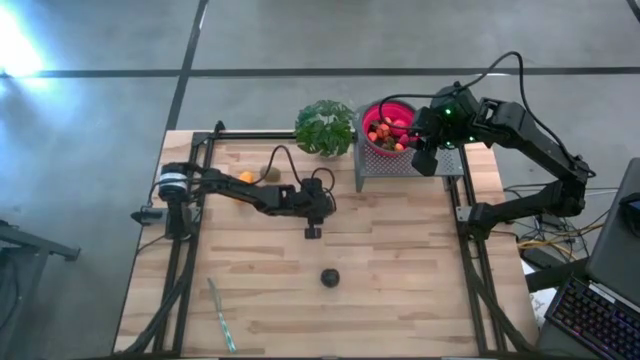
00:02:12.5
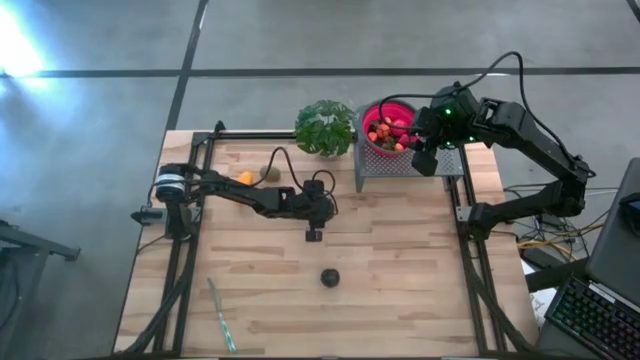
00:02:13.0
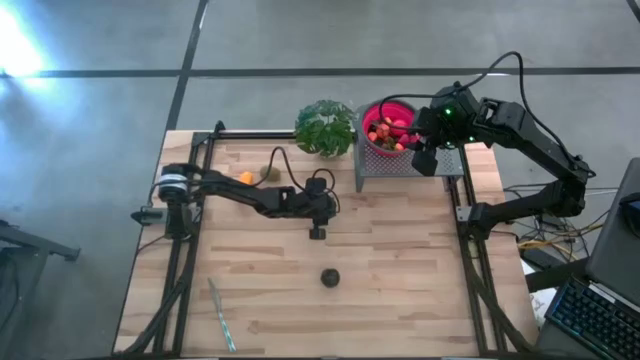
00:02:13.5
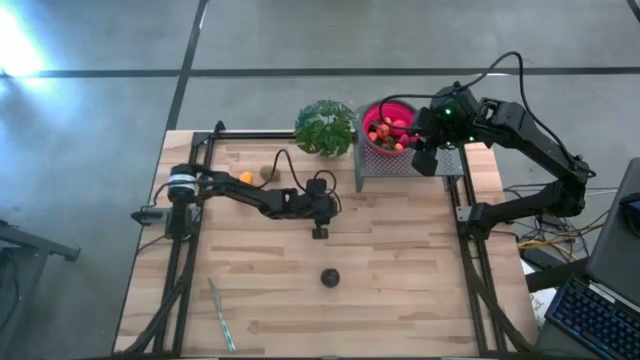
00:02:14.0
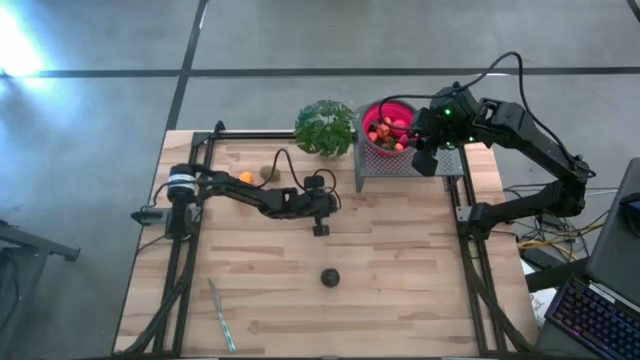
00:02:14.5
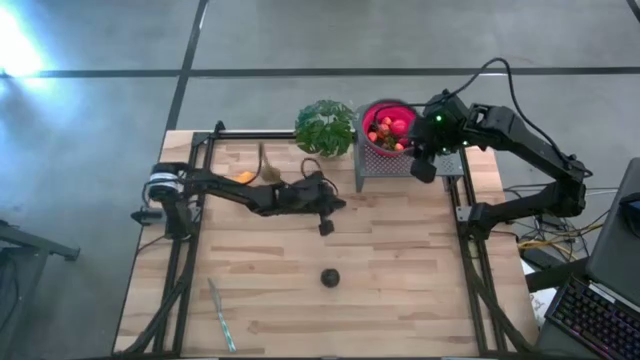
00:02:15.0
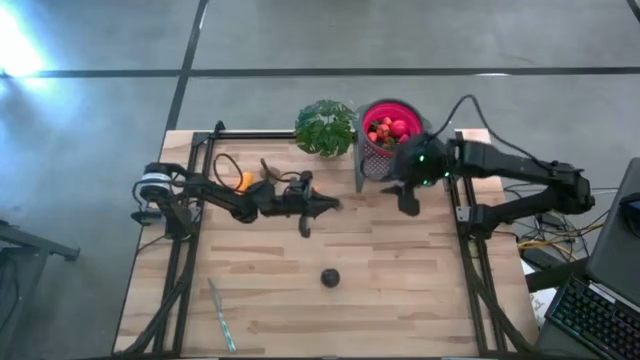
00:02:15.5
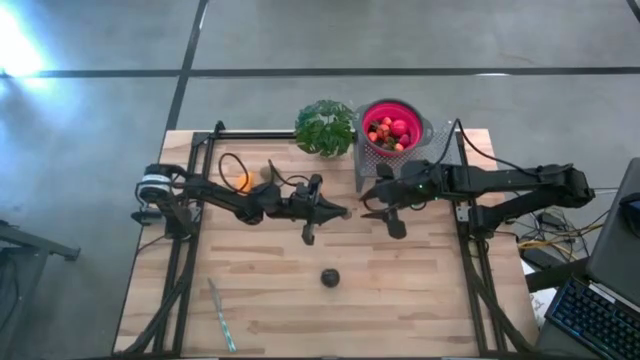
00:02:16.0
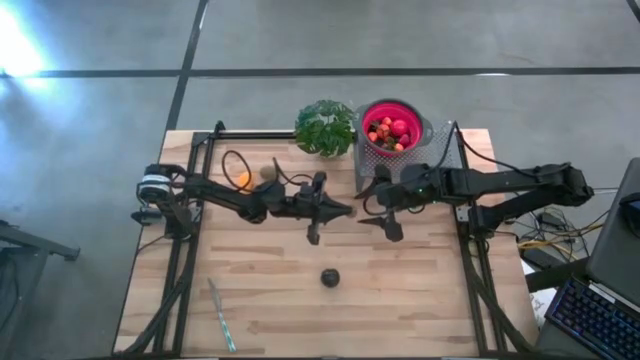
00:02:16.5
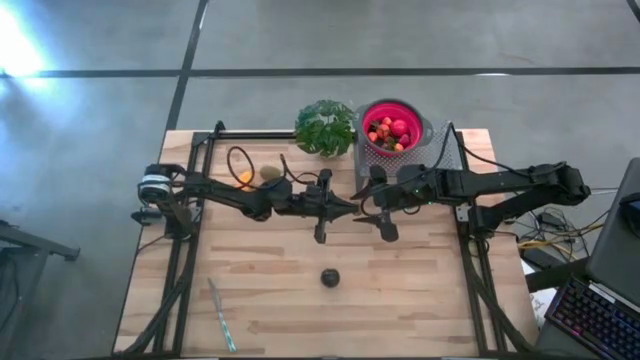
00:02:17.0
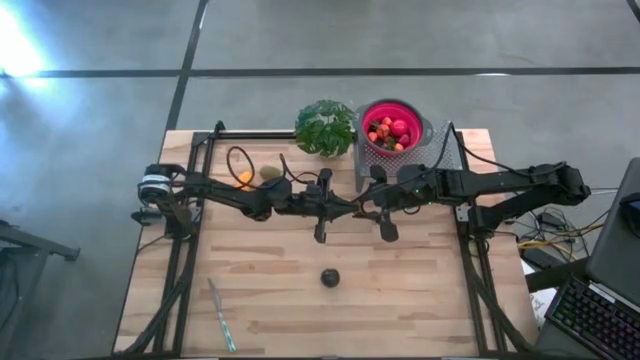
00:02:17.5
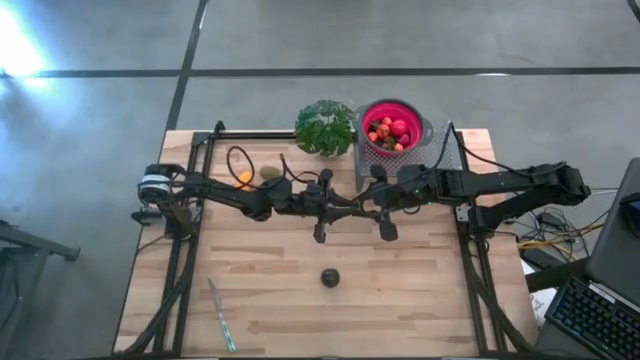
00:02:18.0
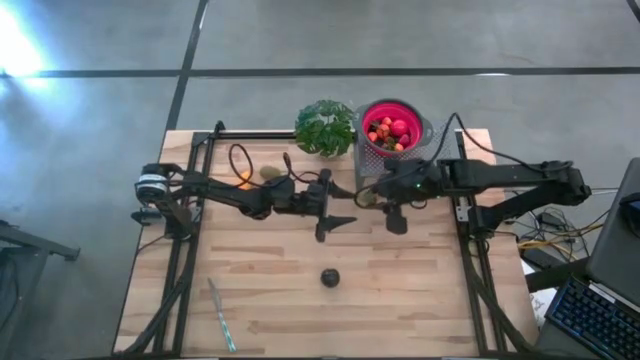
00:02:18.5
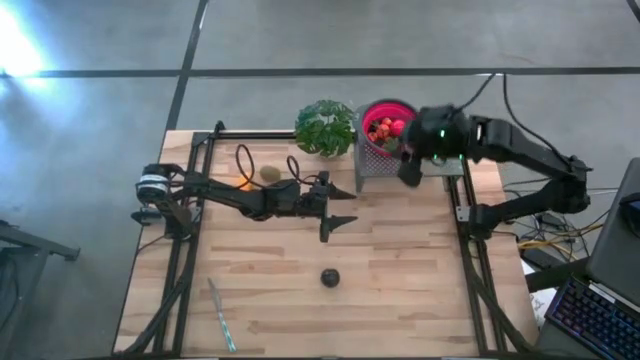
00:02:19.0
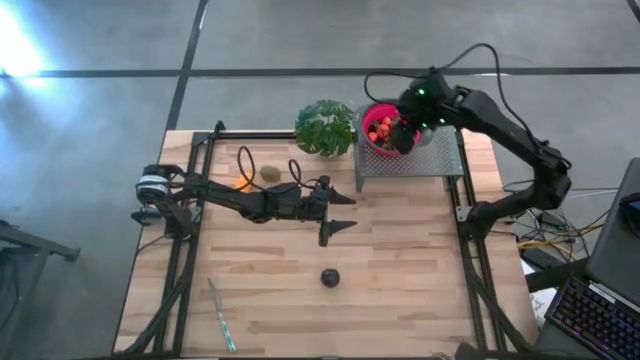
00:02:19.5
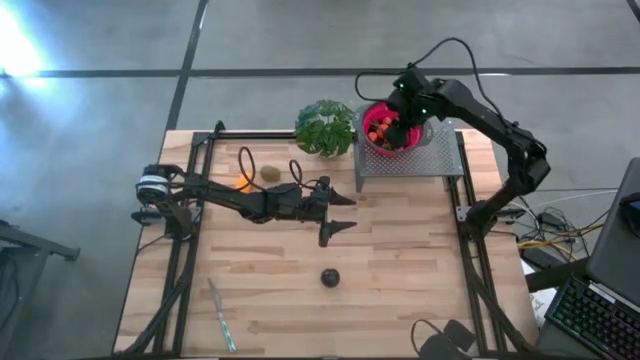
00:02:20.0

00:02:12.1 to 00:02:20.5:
Task: Pick & Place Fruit
Put the strawberry into the red strainer bowl on the shelf

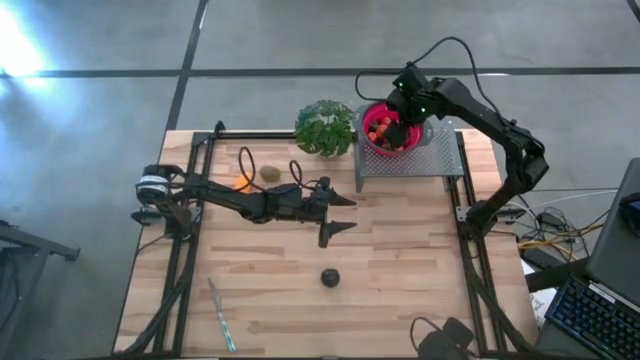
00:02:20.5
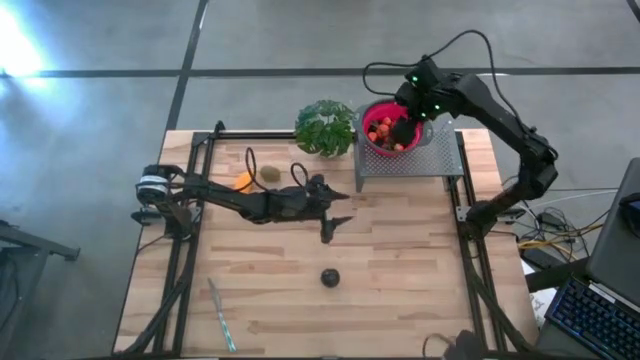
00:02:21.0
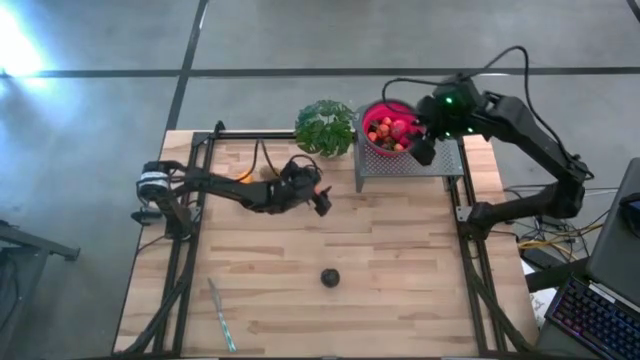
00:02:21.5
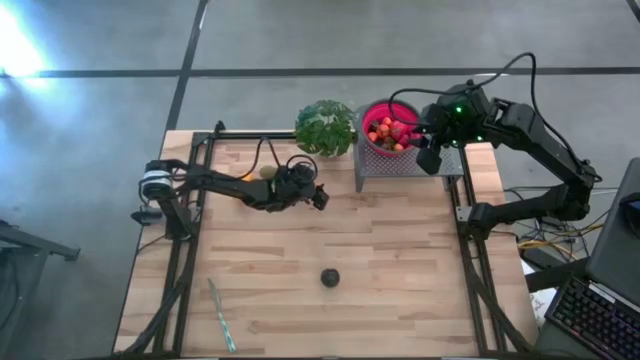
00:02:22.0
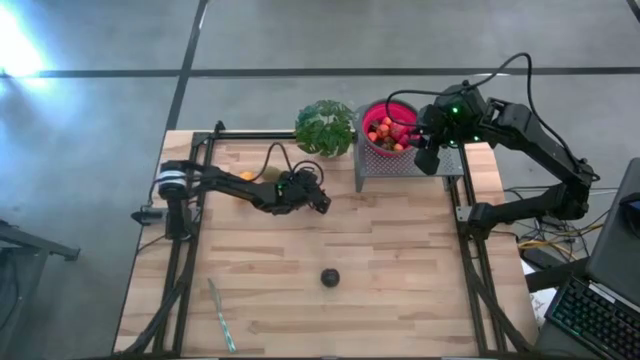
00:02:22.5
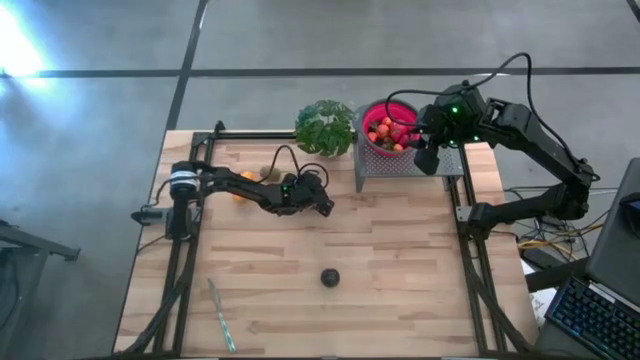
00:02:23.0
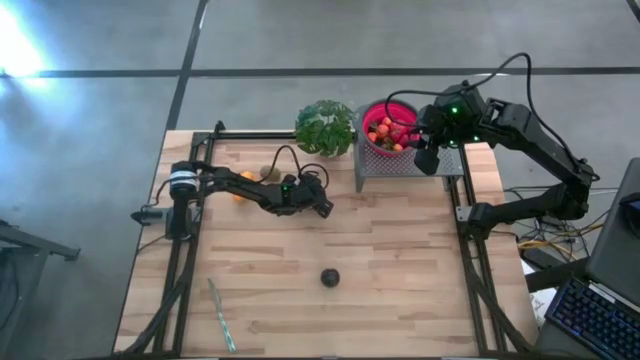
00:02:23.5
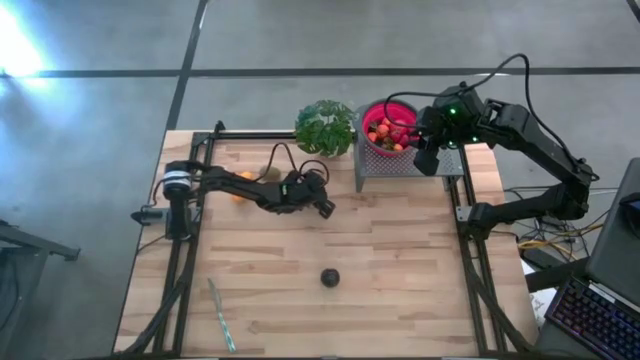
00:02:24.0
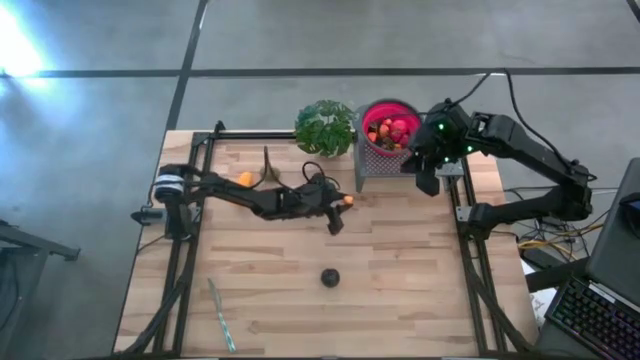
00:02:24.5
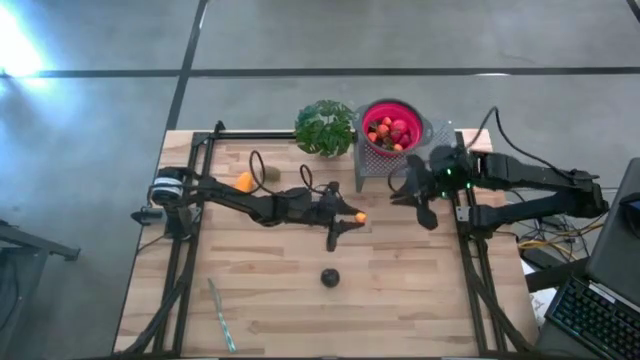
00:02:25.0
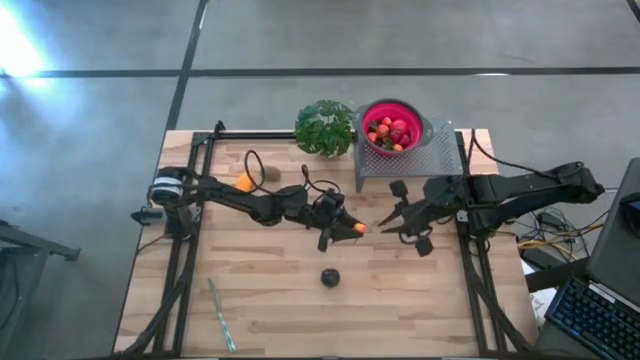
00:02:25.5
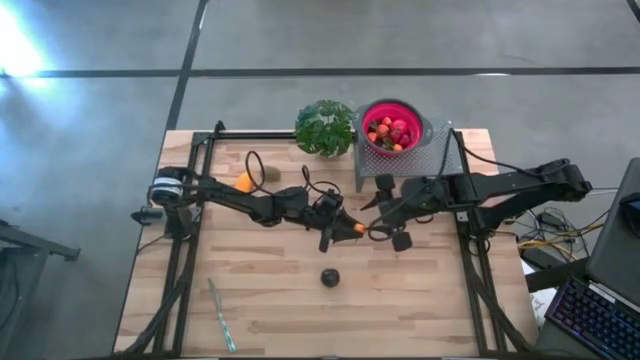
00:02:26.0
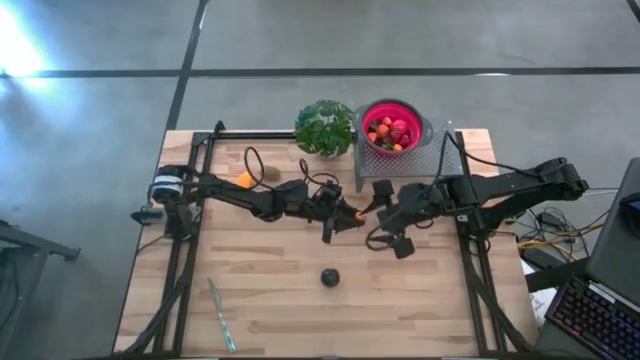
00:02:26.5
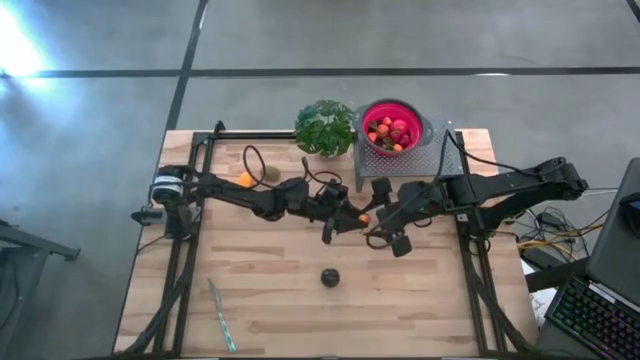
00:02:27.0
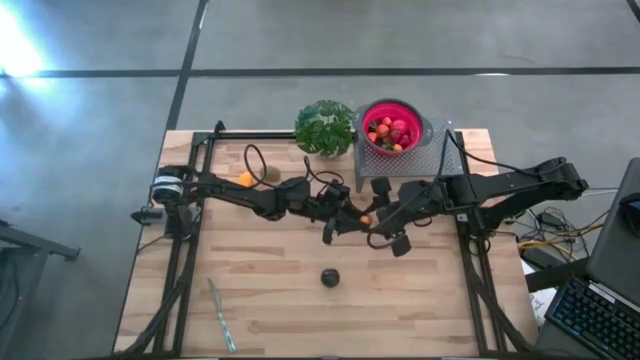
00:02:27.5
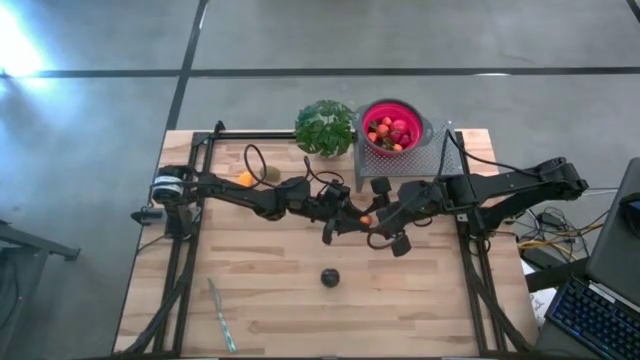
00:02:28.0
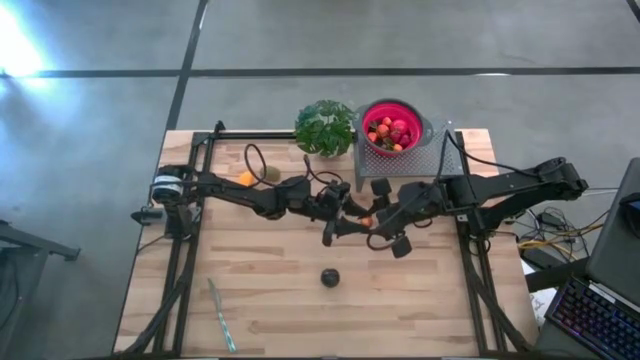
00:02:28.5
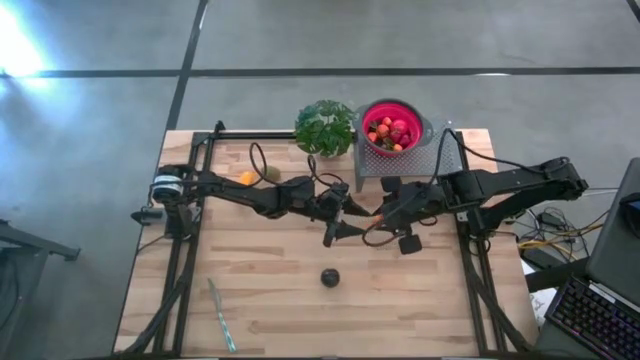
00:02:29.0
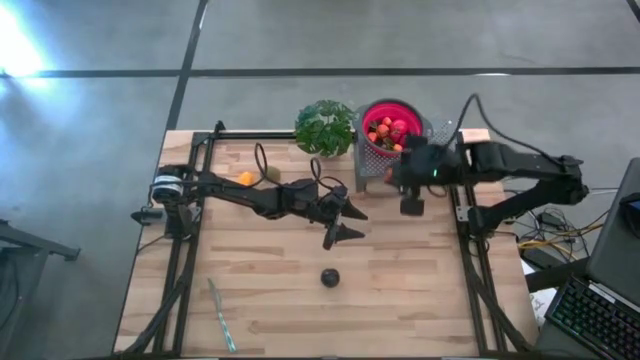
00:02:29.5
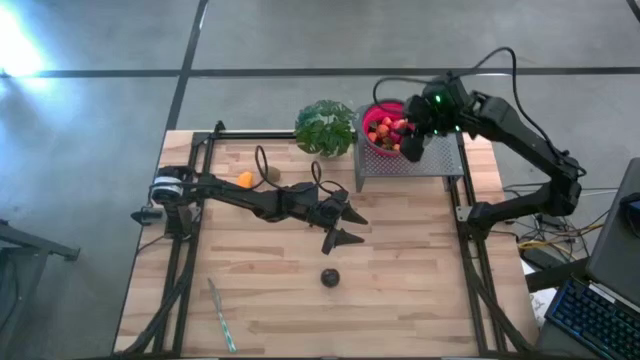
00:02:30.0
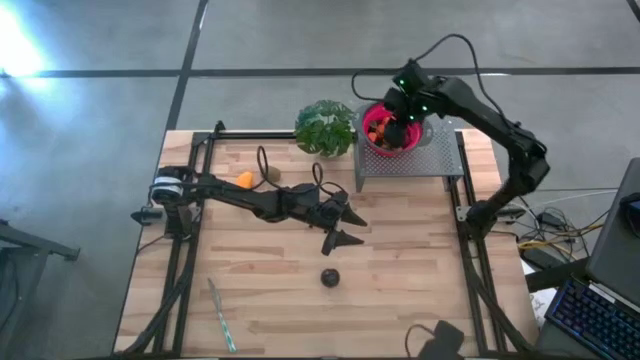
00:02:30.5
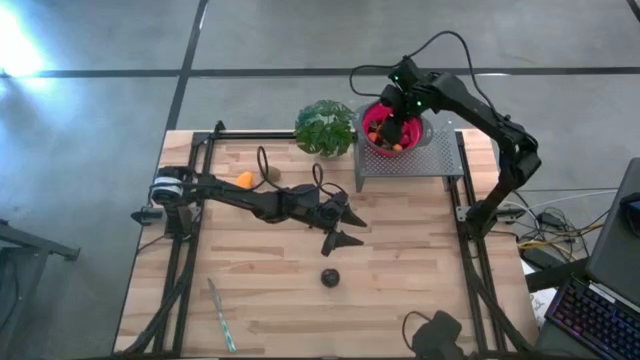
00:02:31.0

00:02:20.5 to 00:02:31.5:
Put the pear into the red strainer bowl on the shelf

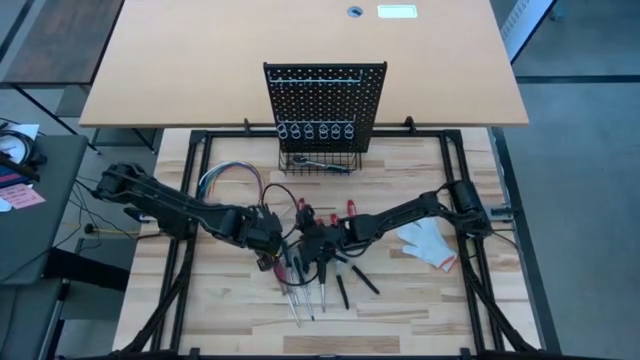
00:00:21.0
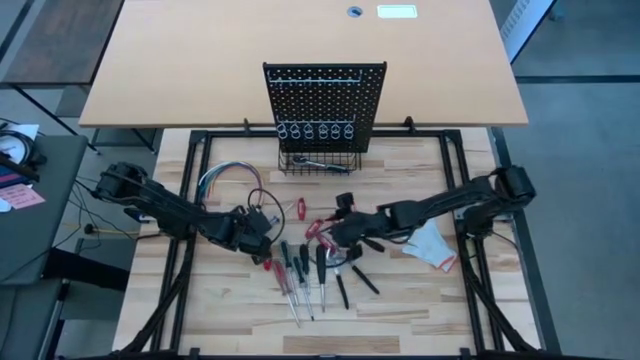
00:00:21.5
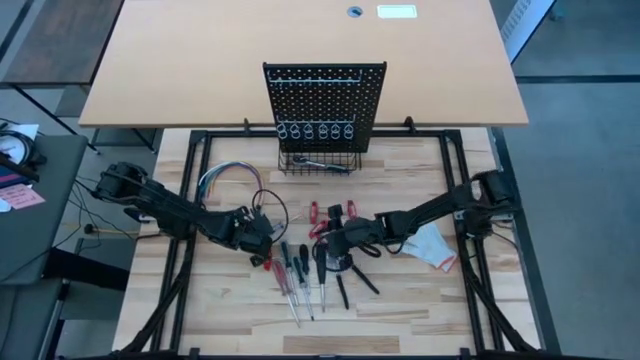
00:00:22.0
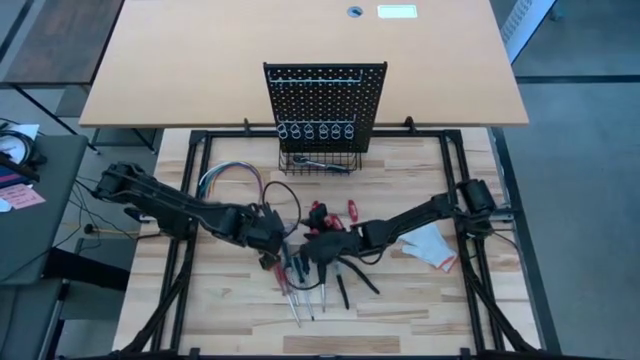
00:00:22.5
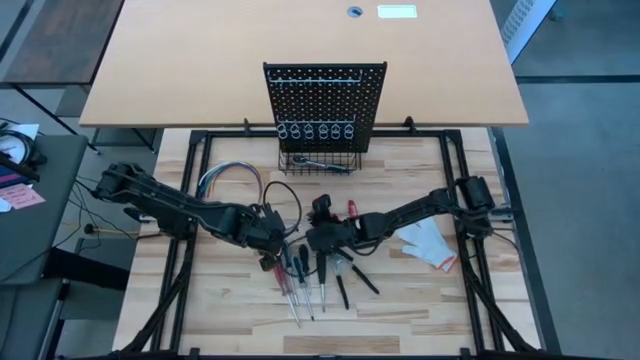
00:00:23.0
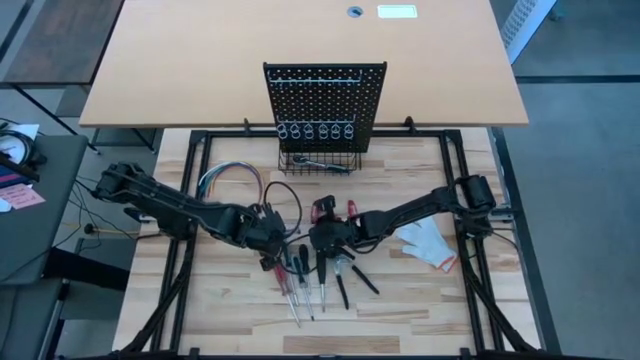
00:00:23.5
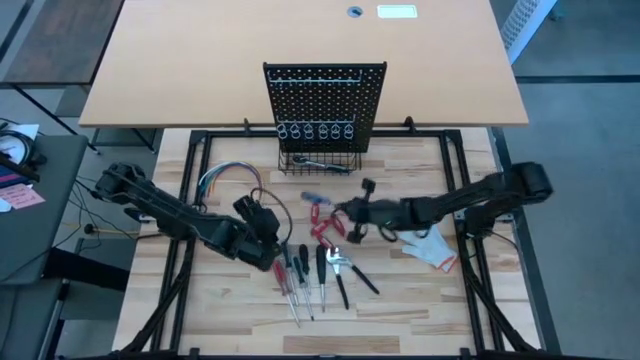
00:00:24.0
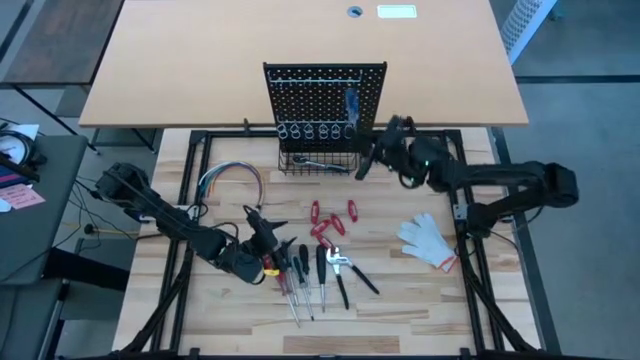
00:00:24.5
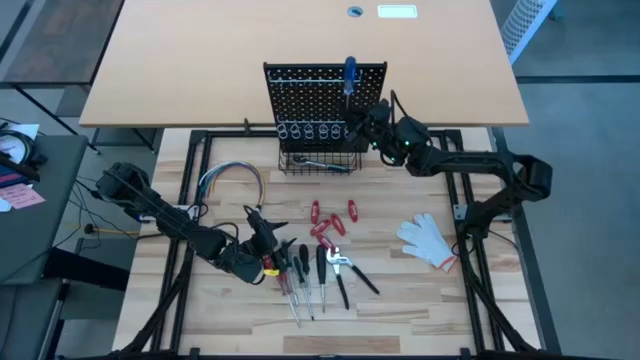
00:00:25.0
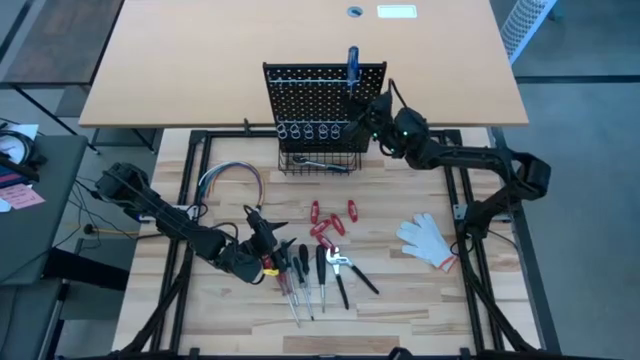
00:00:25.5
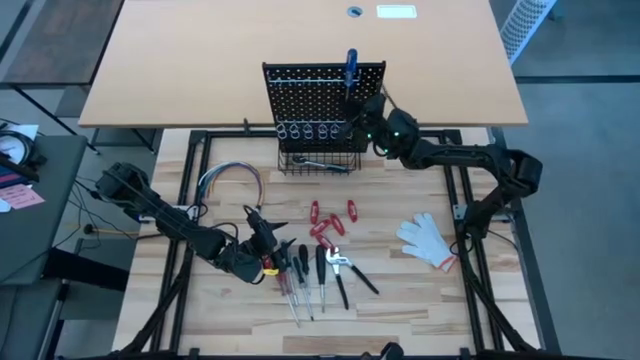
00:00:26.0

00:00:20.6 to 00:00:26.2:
Task: Hang tools onto peg board
Hang the blue screwdriver on the pegboard
